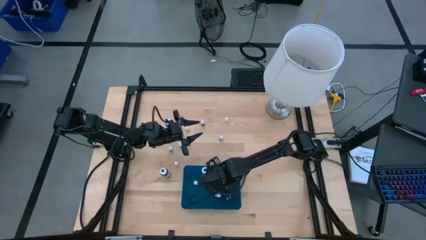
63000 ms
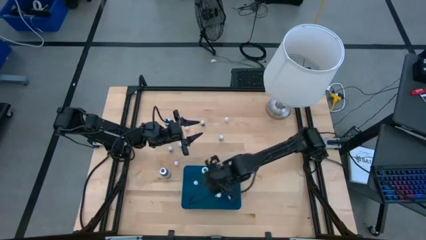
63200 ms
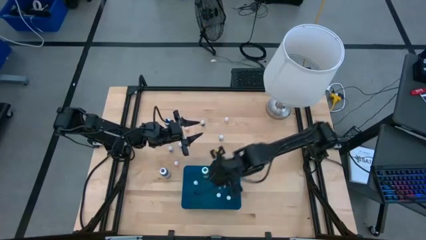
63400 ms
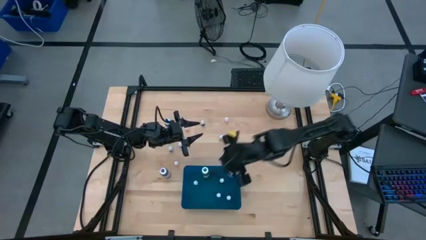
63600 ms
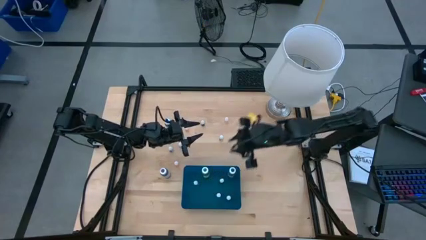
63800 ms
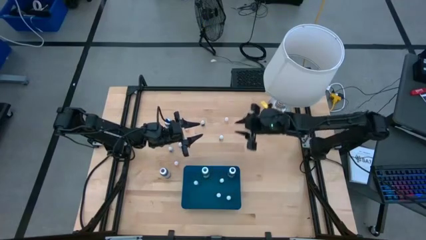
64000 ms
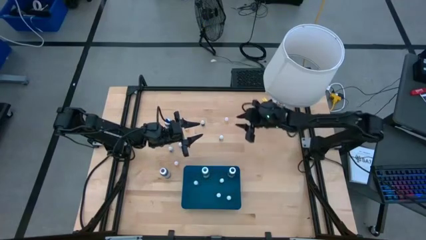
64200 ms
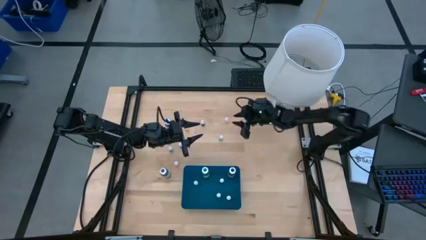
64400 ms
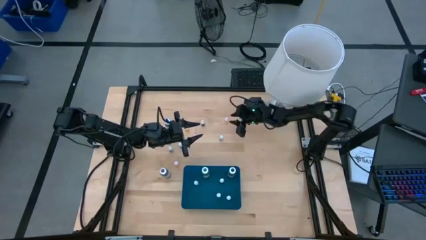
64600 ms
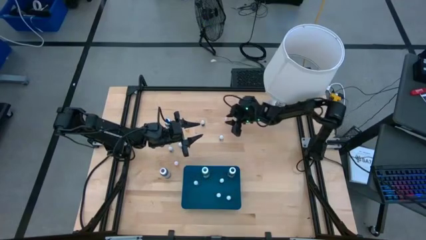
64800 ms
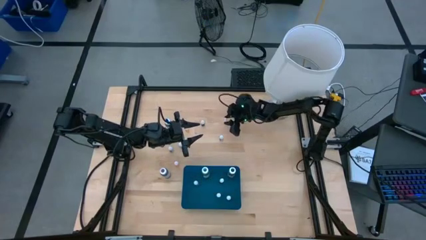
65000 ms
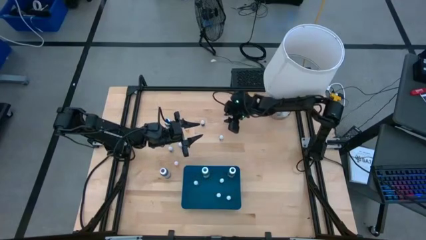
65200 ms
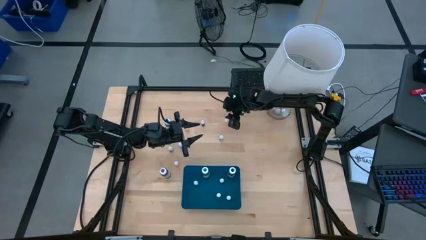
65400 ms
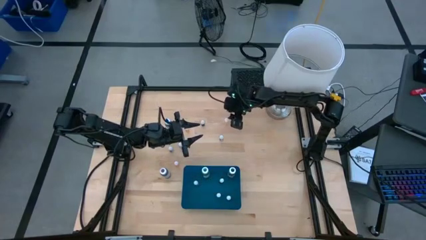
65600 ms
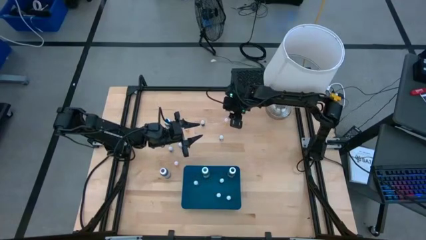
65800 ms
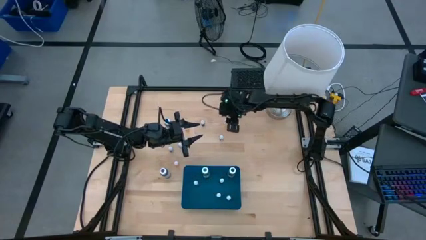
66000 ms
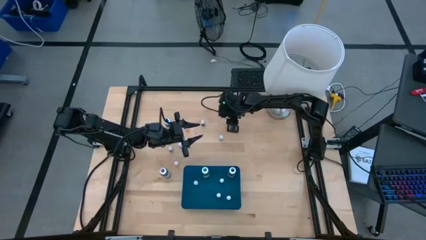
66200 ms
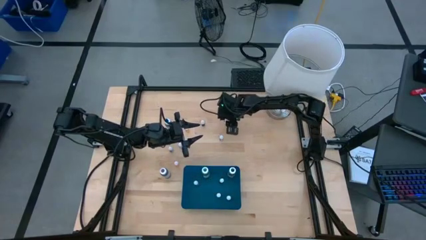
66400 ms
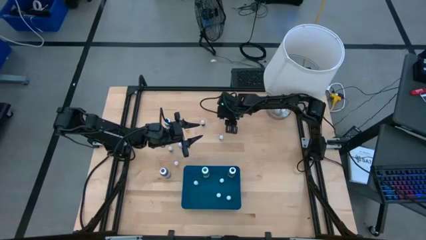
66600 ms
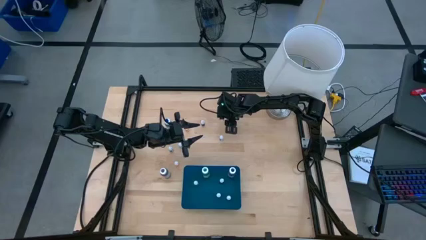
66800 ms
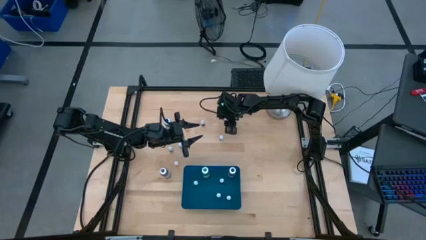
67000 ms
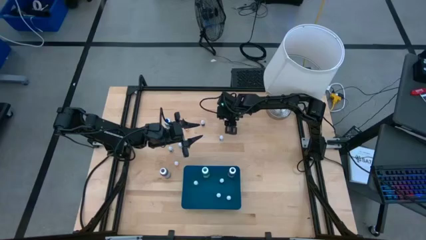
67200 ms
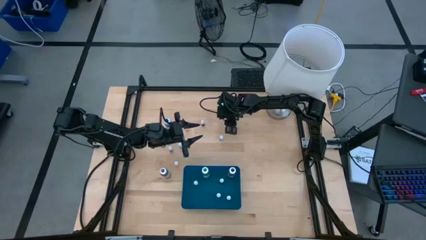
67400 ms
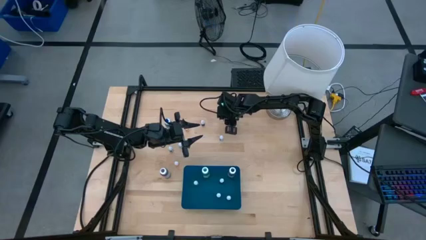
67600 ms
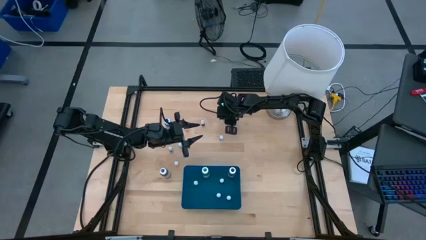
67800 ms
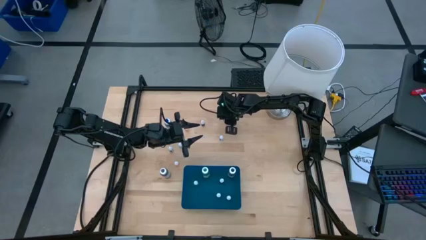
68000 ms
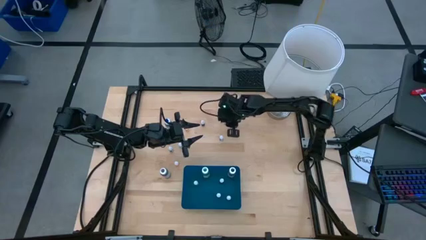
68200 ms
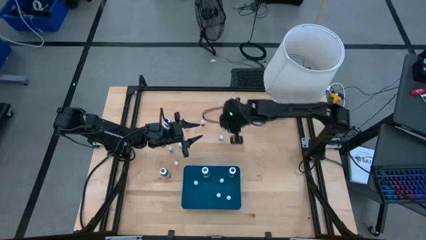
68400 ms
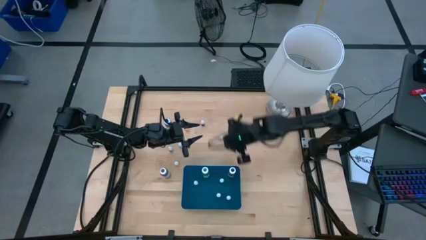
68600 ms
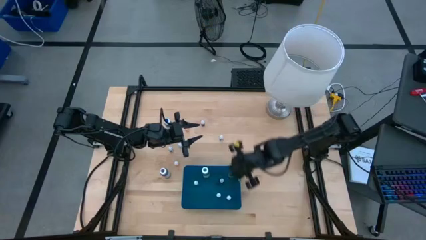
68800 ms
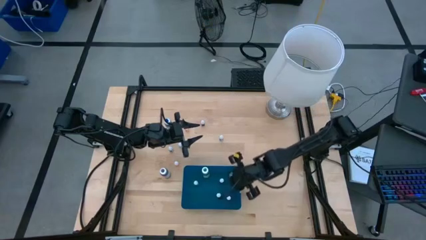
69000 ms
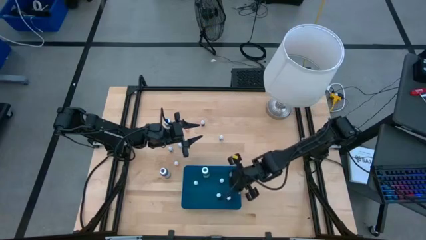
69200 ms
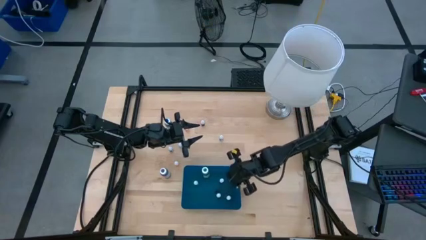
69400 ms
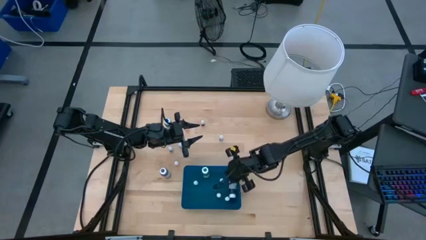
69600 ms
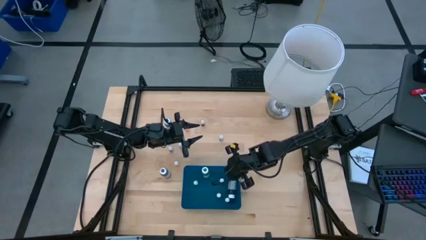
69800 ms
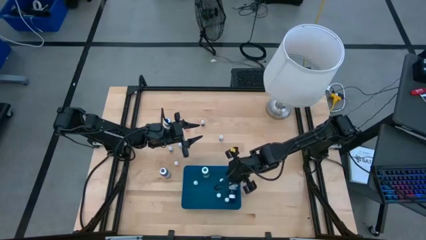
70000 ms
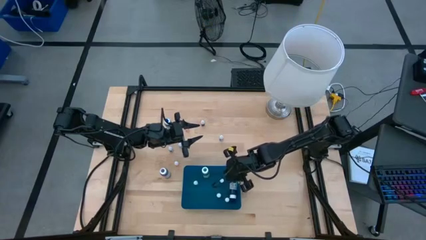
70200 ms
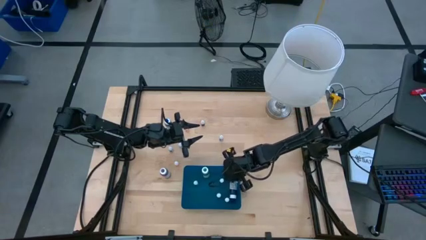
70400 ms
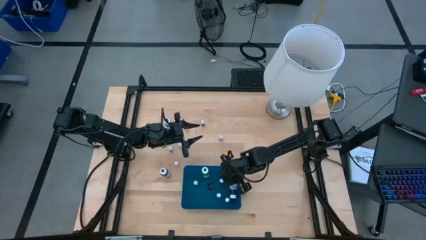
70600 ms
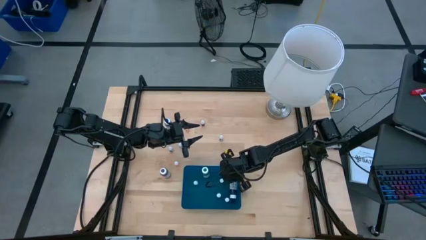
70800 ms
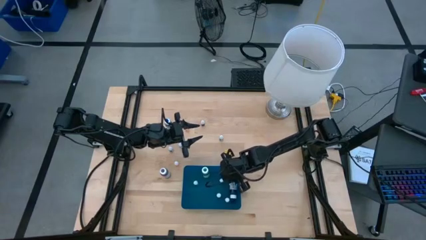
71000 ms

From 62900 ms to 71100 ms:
Task: Pick & Place food coloring
Put the orange food coloring bottle into the blue container

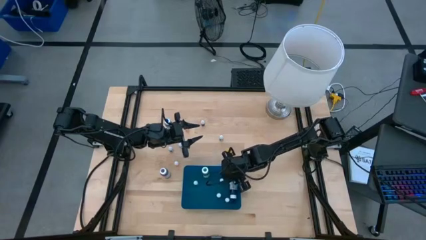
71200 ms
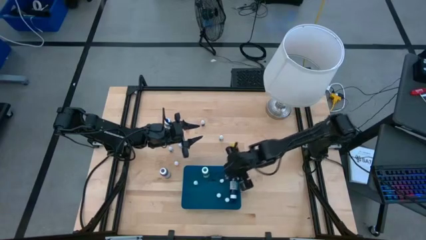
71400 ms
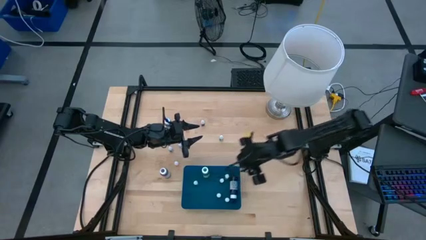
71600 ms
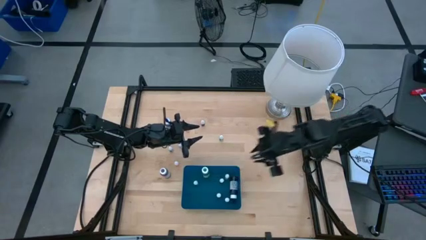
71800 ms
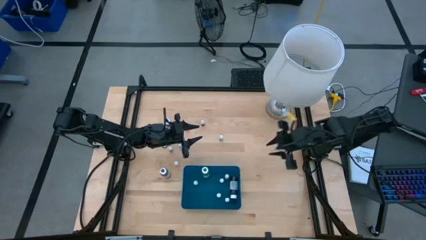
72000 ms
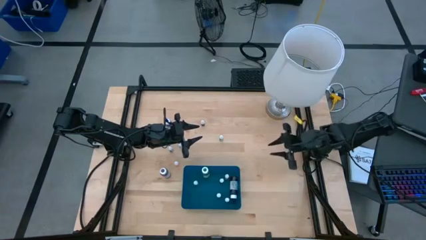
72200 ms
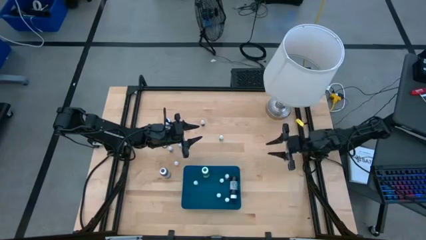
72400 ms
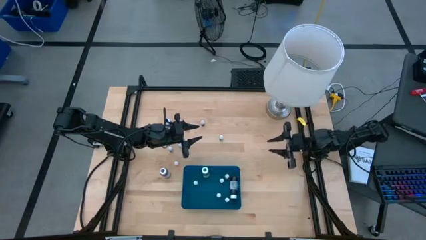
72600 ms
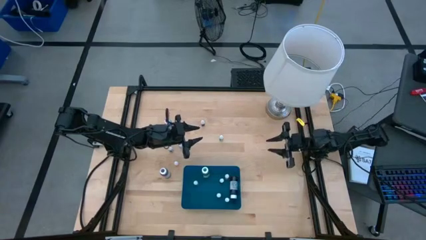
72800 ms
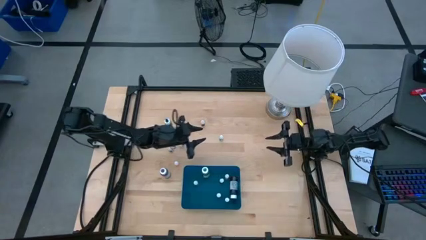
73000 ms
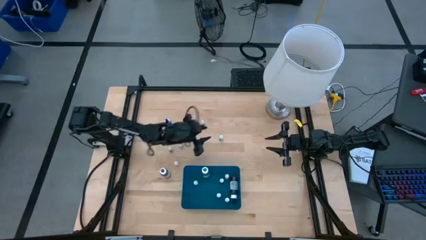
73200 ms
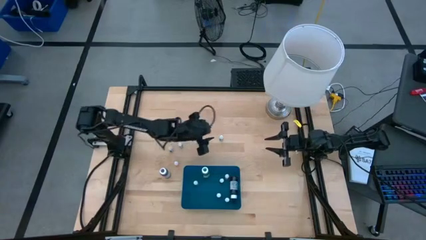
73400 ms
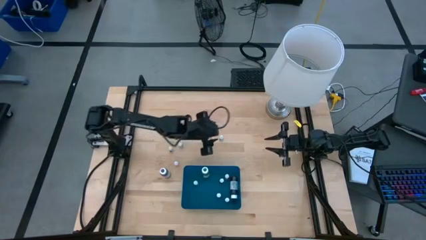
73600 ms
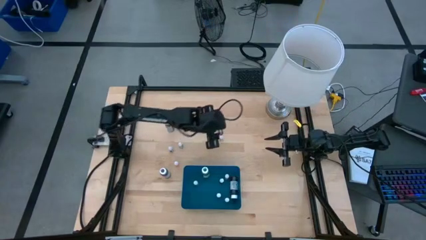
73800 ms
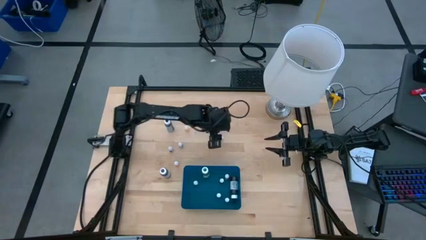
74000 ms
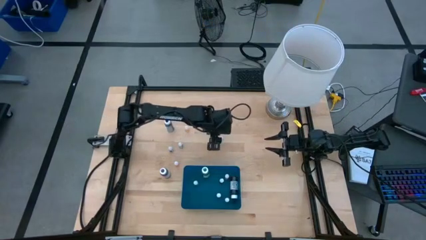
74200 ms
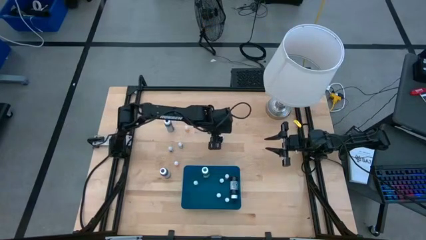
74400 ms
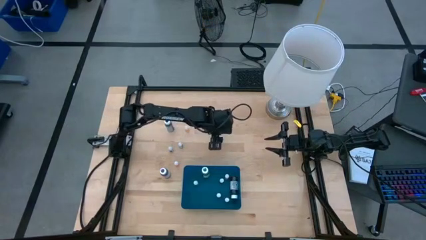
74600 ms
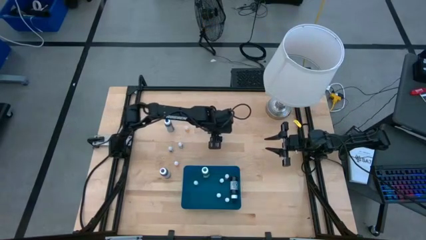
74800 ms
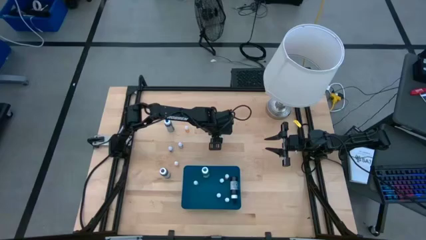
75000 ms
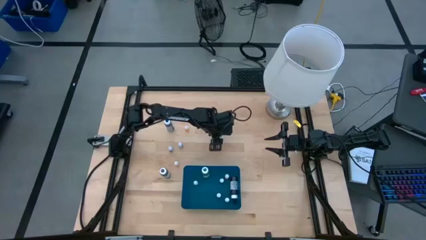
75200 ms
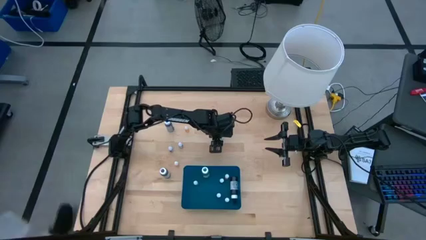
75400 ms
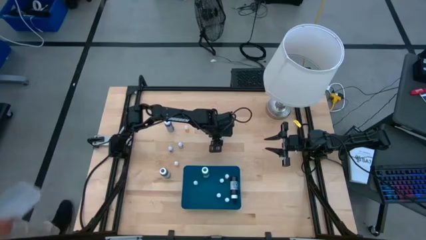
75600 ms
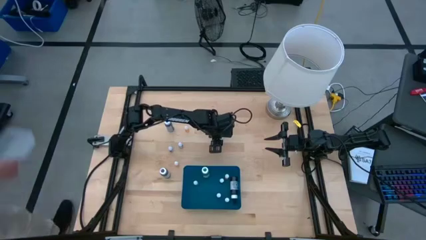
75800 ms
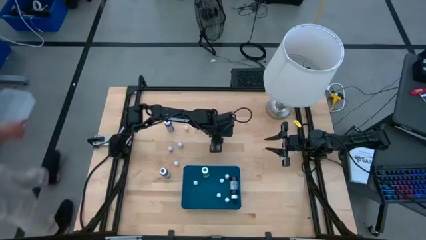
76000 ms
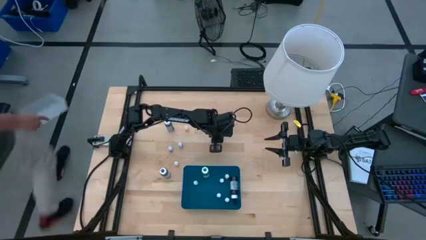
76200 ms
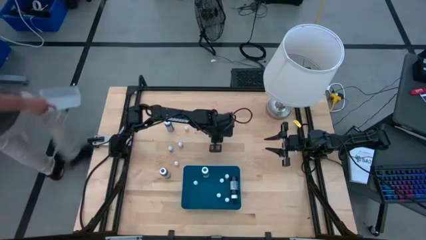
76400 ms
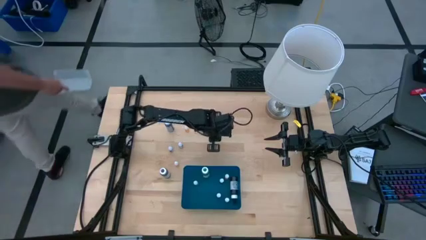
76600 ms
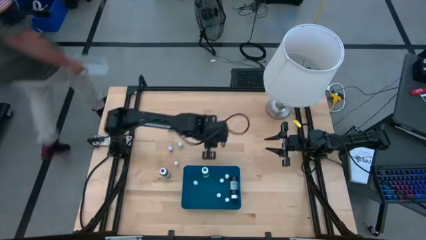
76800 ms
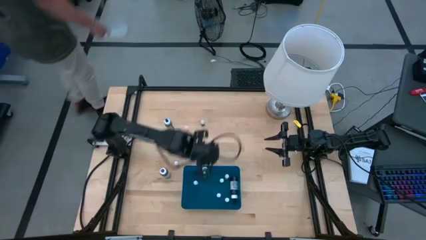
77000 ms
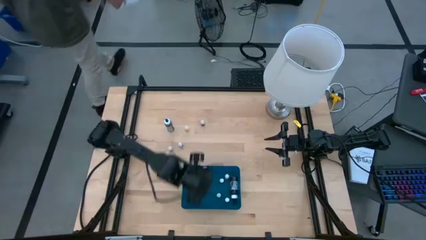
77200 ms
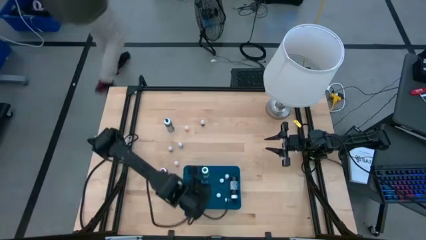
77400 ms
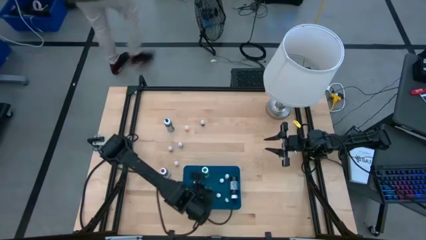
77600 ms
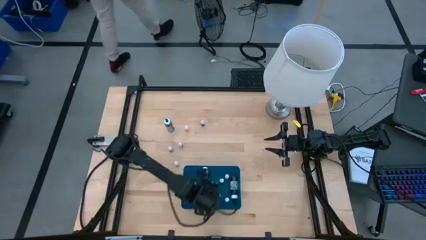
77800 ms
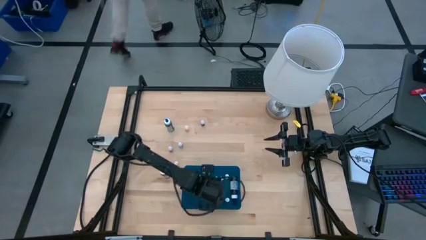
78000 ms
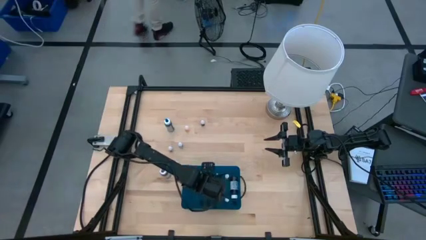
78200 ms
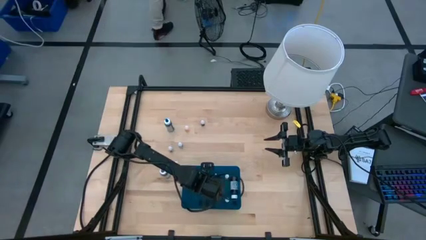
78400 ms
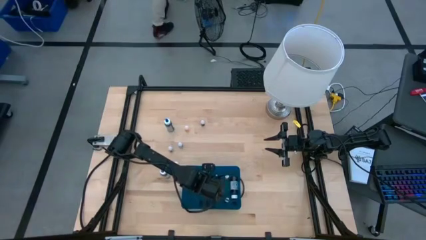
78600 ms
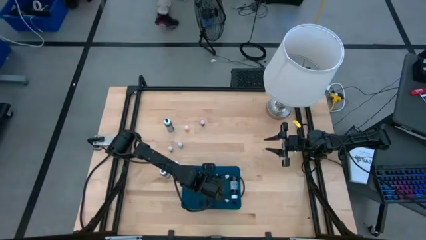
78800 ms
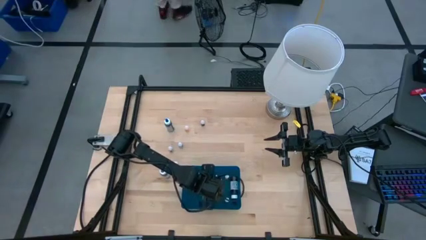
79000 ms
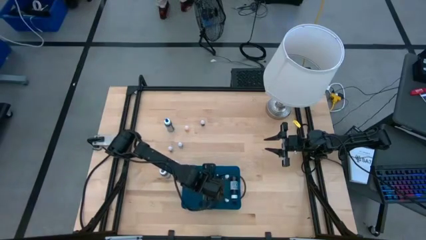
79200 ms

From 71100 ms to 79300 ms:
Put the purple food coloring bottle into the blue container
